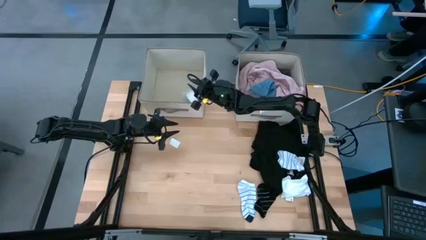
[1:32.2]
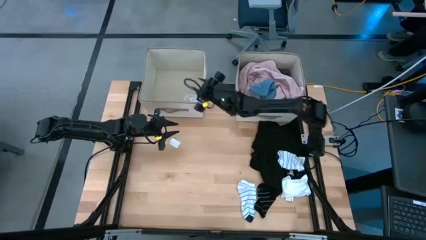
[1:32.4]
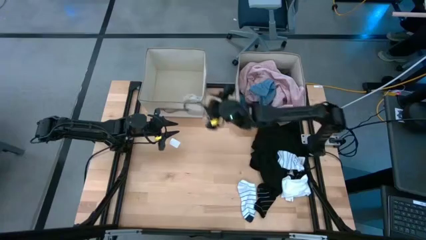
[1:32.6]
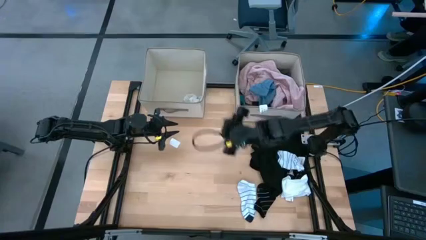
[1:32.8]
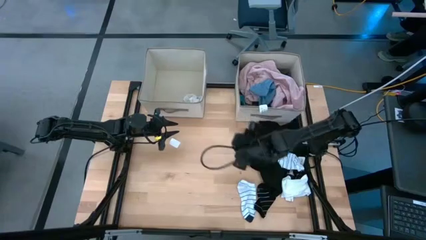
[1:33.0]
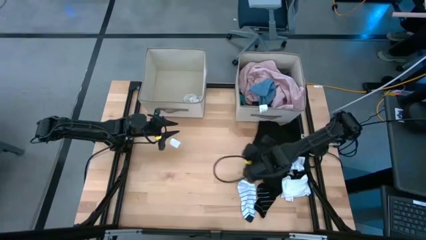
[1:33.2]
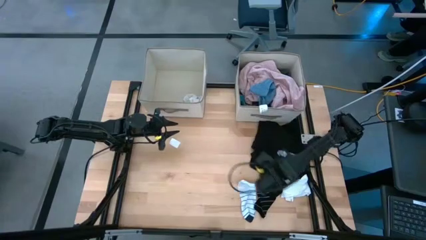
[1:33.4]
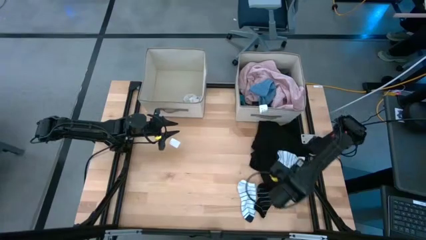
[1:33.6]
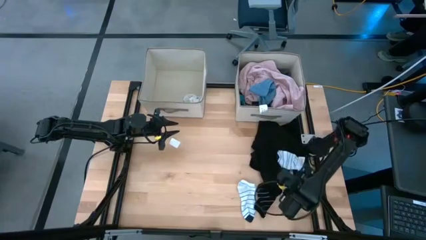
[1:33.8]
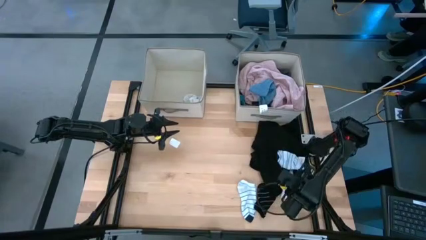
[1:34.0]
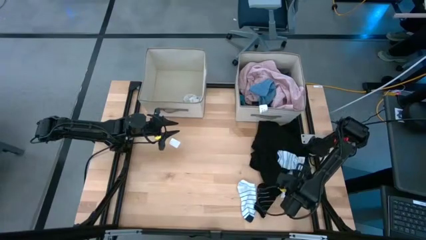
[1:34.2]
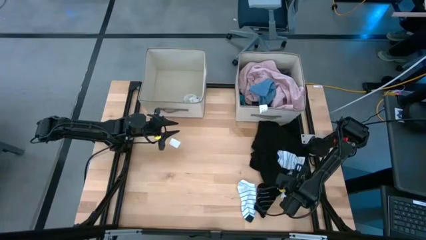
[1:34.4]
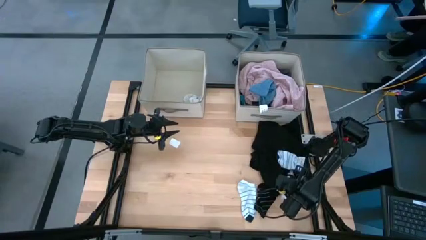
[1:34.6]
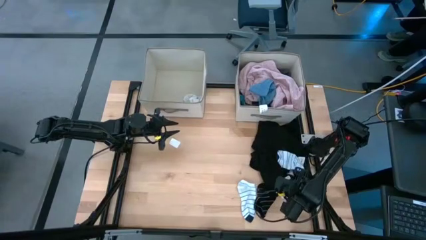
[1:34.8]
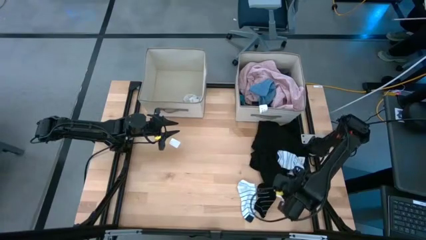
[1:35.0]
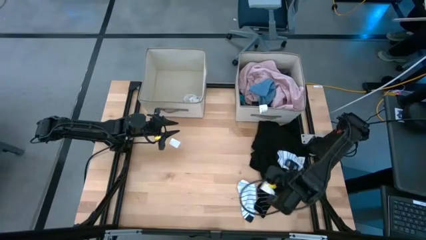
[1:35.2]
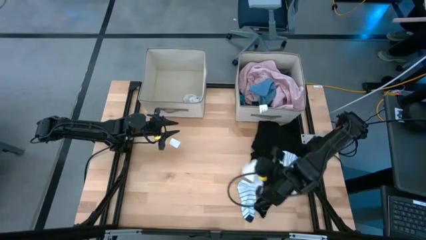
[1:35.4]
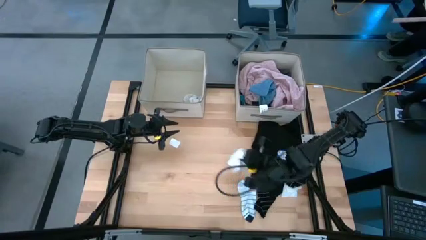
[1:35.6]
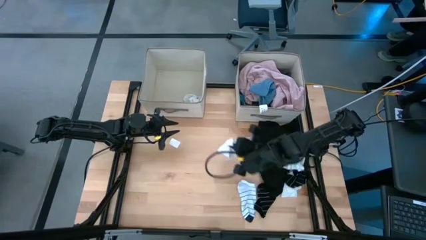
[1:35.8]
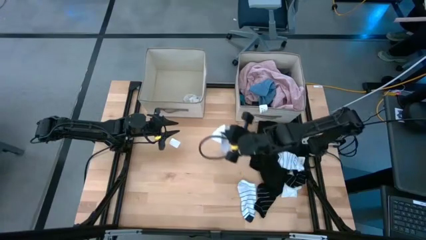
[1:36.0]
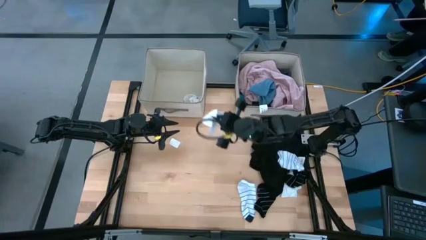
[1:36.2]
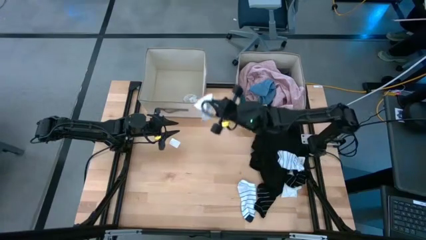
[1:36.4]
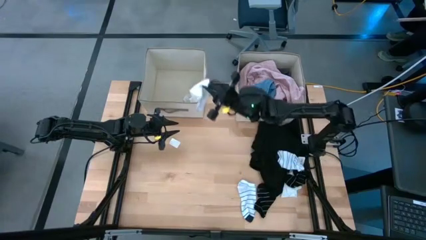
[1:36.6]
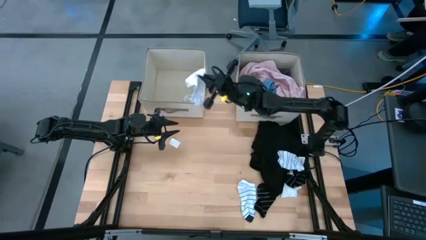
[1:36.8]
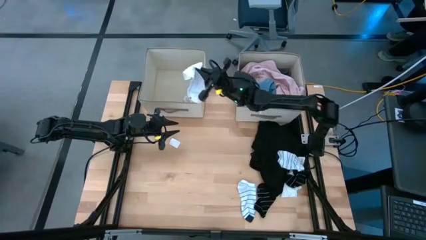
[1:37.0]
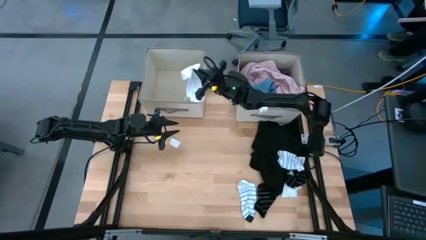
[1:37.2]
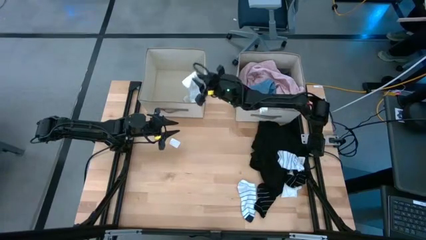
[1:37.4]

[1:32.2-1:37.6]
Task: Sort clothes
Put the top white sock into the left laundry organizer

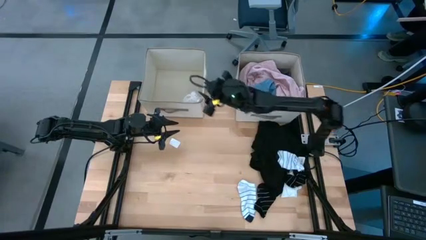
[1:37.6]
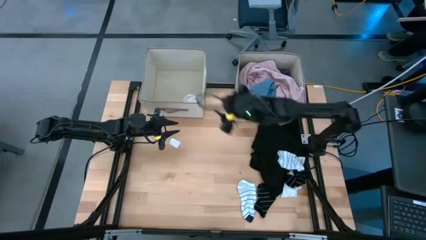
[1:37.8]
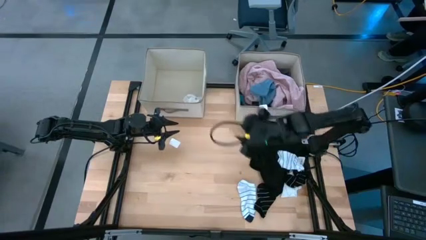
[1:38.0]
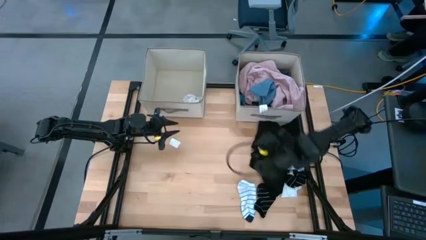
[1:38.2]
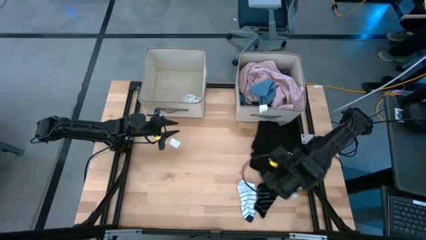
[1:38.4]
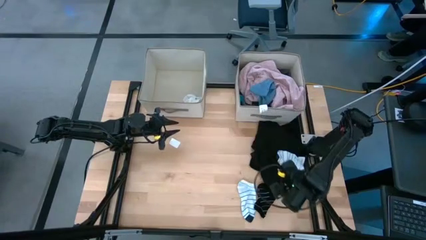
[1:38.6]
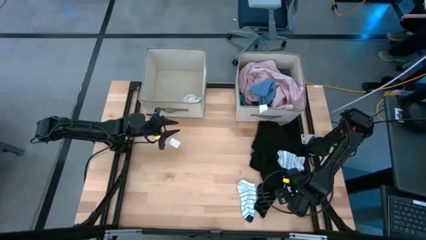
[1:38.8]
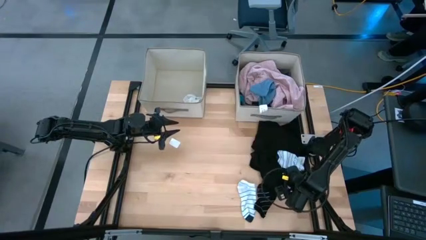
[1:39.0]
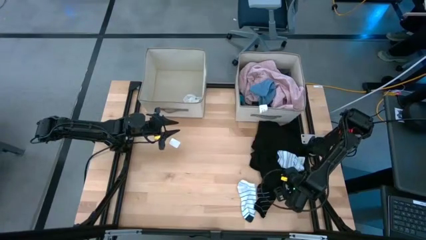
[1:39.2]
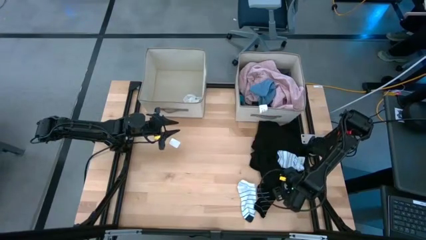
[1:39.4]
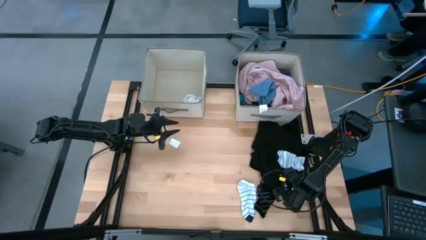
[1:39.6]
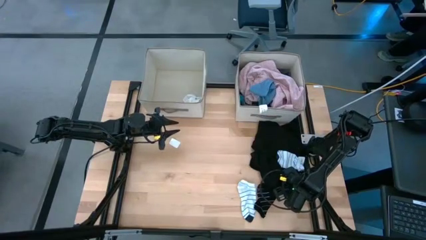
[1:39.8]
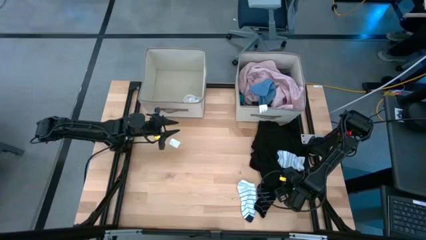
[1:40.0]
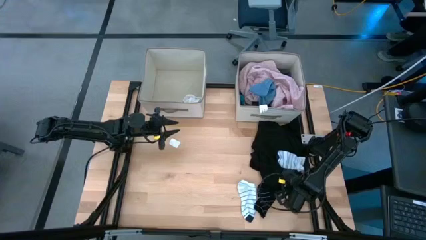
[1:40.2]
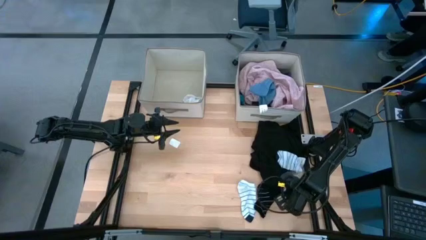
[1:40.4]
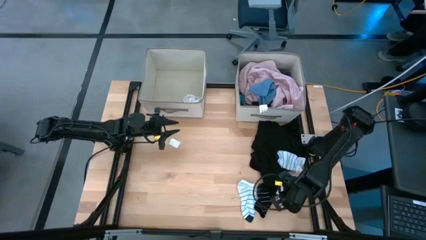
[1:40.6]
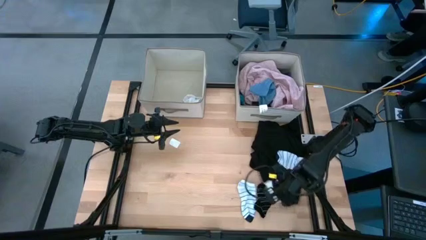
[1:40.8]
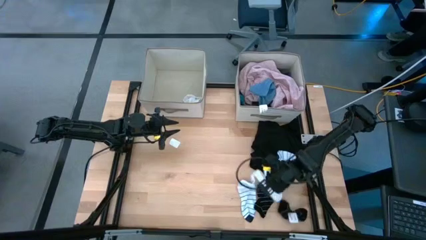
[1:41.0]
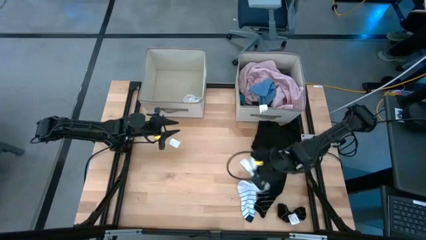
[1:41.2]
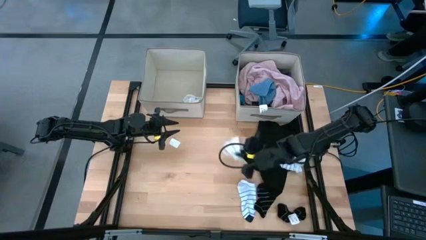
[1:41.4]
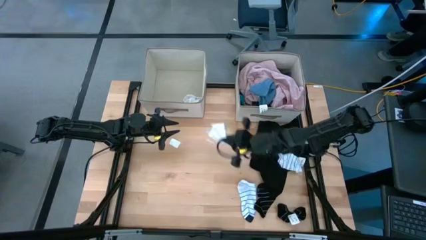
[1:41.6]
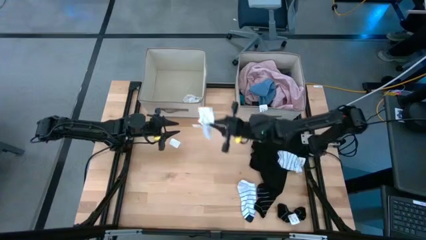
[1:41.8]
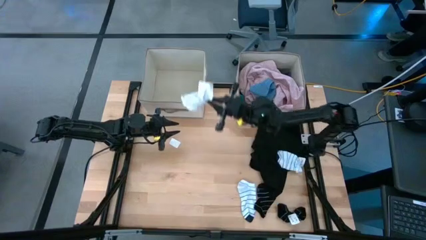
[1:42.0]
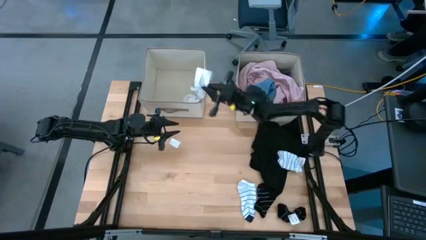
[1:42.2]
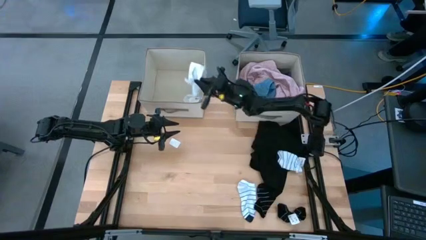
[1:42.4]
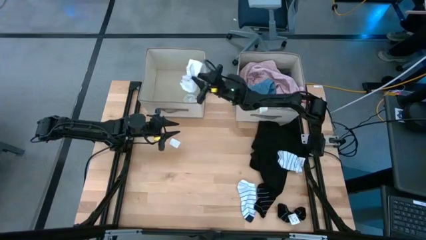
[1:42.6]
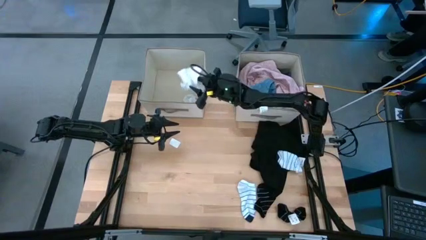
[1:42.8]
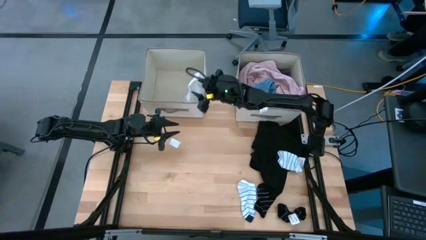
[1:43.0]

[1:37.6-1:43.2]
Put the white sock into the left laundry organizer

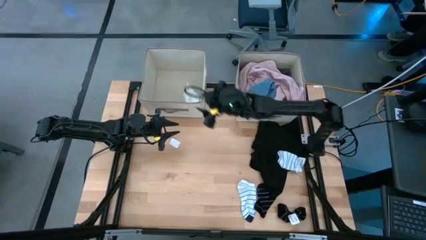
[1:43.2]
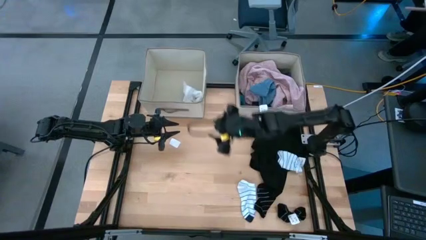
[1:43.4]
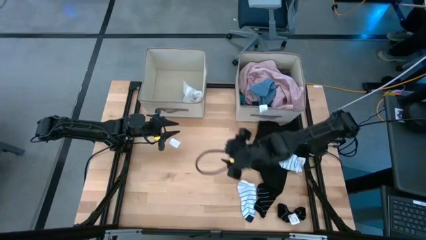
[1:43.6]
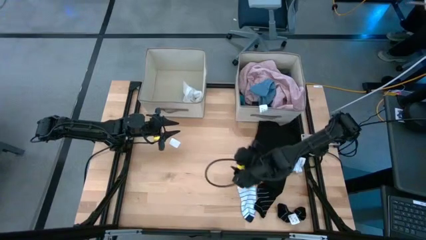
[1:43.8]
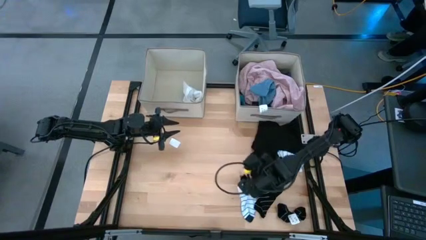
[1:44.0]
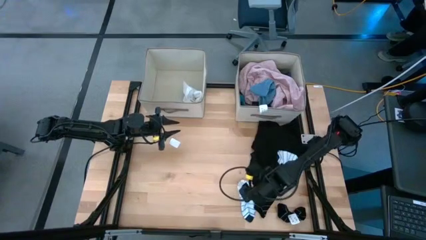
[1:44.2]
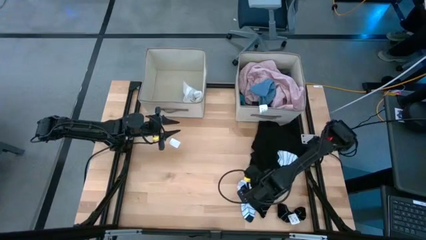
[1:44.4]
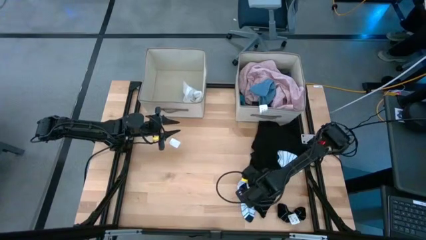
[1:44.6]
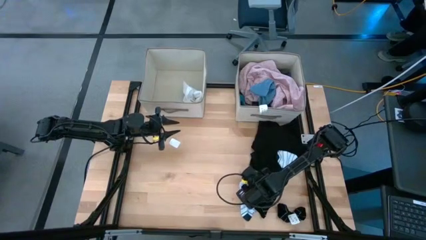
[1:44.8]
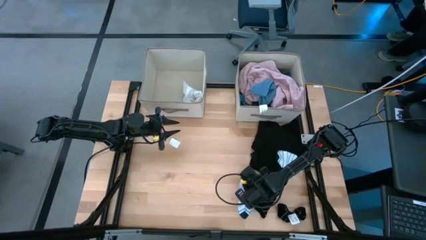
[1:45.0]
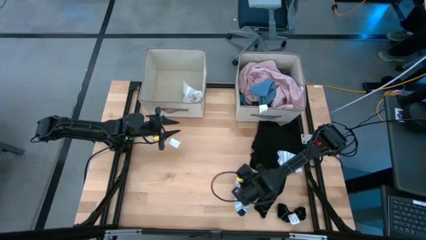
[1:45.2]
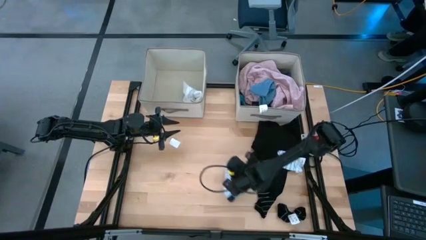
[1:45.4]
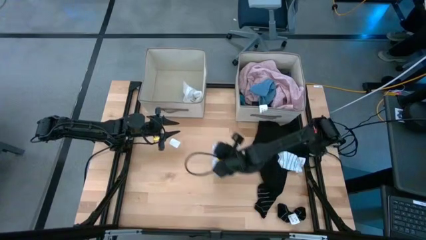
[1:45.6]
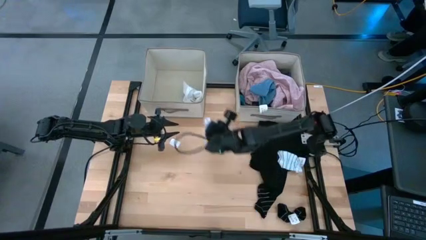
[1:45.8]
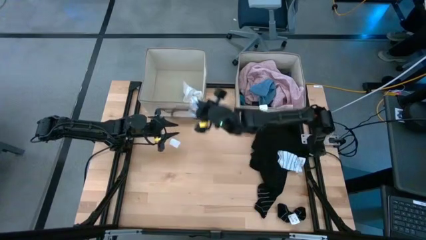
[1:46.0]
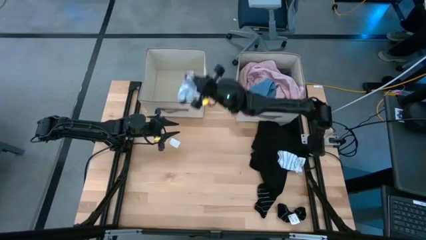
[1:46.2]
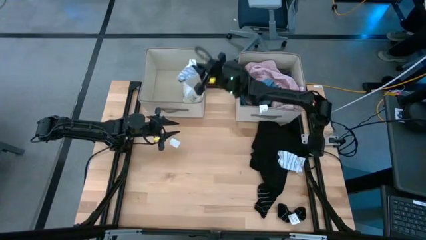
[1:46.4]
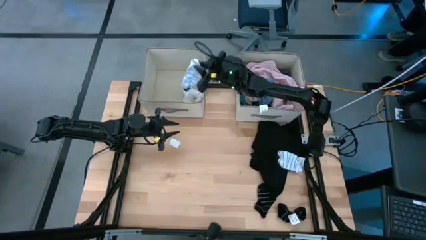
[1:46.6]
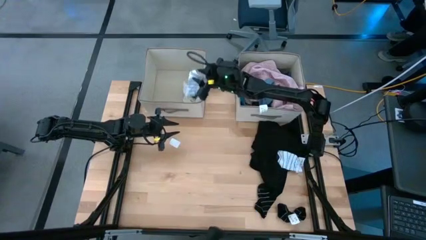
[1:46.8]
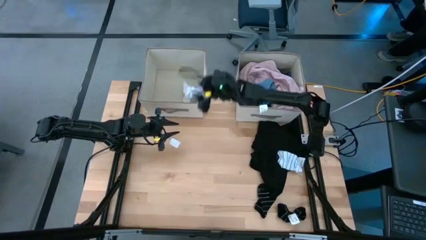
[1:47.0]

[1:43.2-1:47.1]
Put the left white stripe sock into the left laundry organizer
